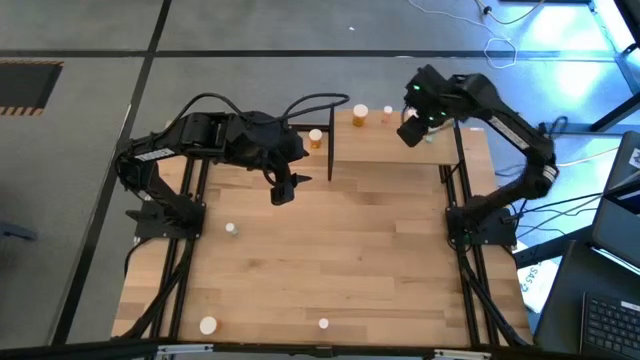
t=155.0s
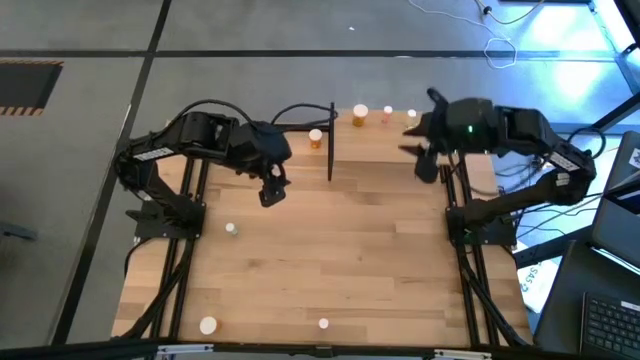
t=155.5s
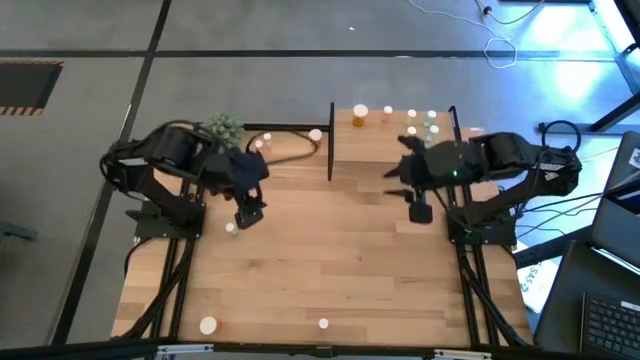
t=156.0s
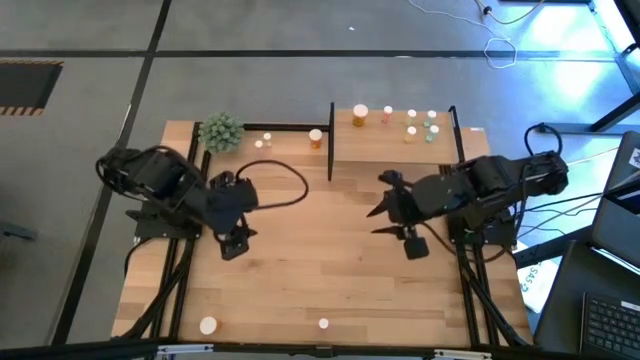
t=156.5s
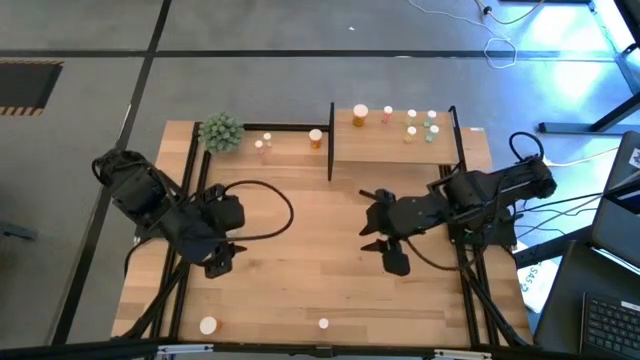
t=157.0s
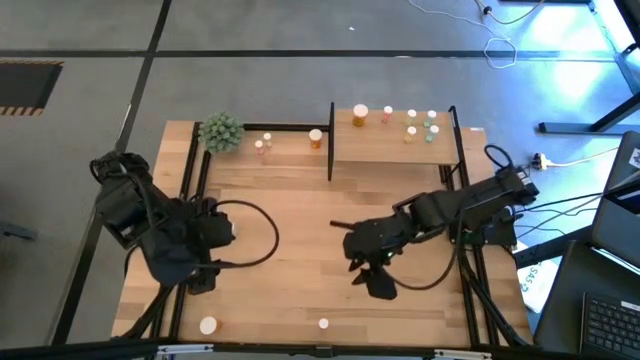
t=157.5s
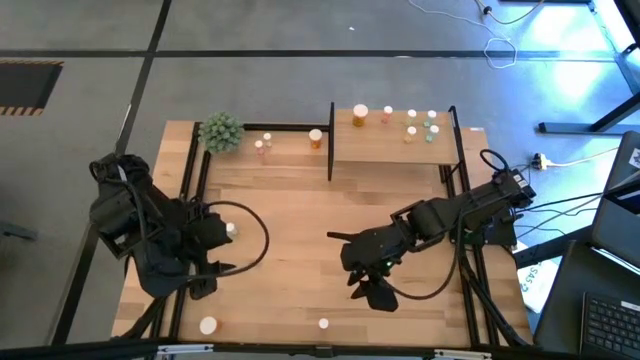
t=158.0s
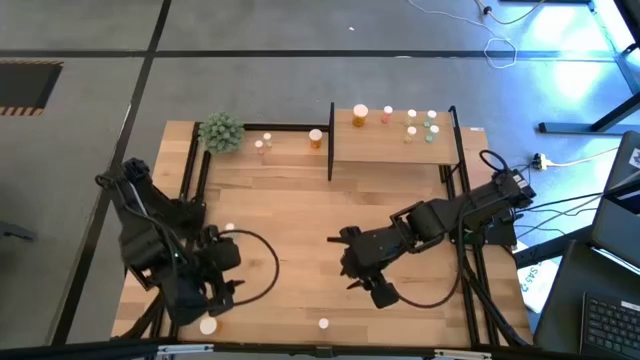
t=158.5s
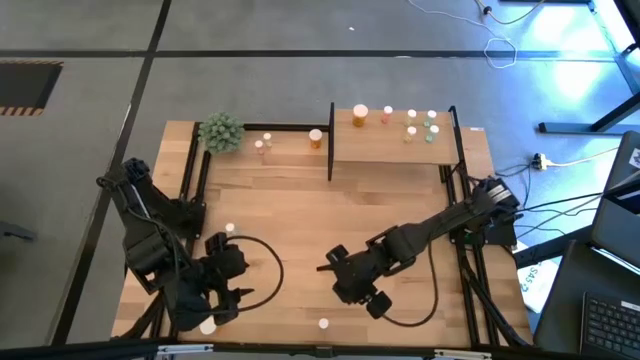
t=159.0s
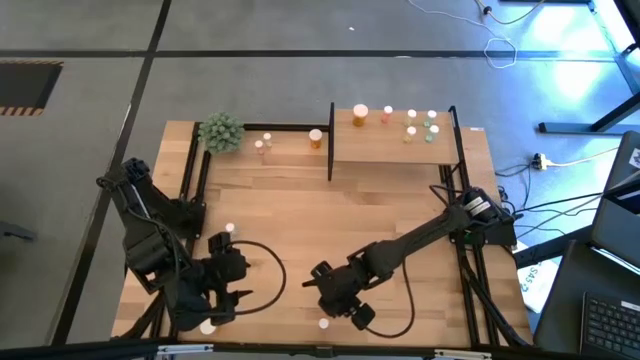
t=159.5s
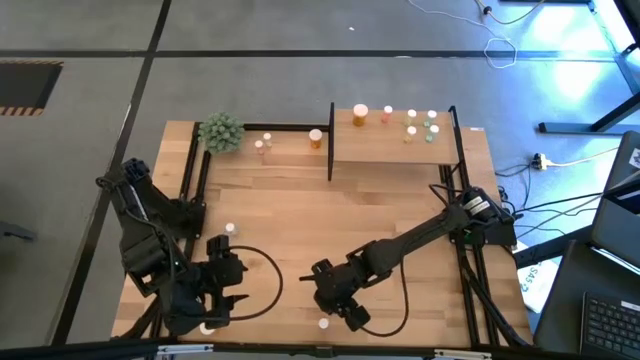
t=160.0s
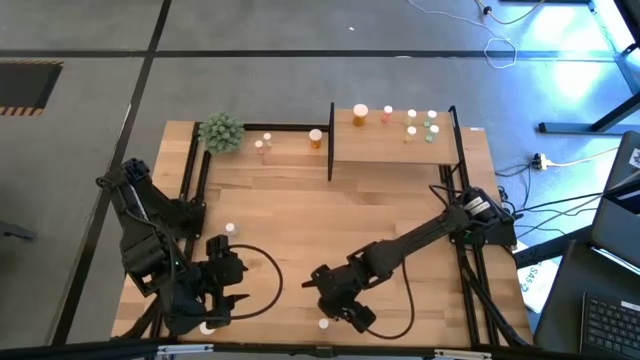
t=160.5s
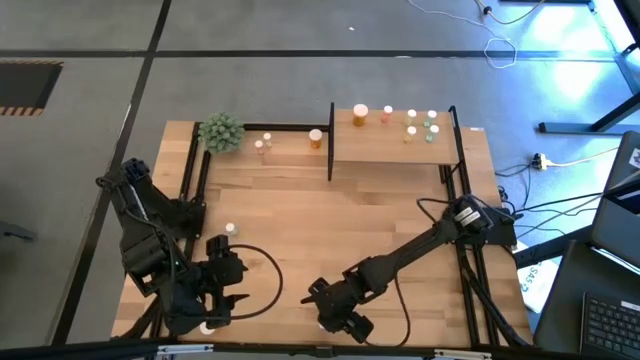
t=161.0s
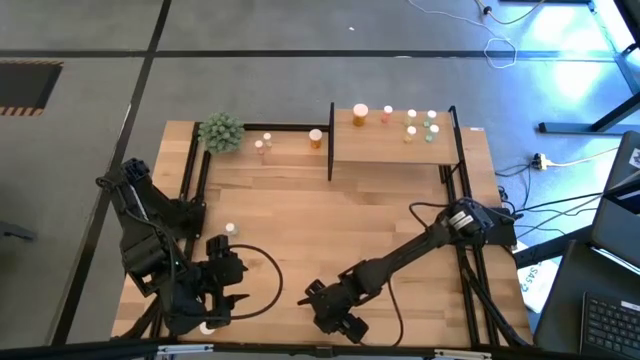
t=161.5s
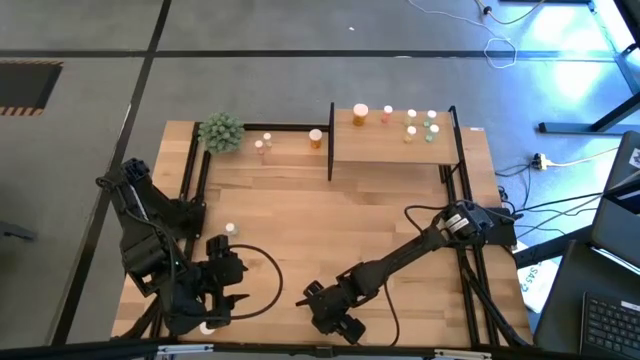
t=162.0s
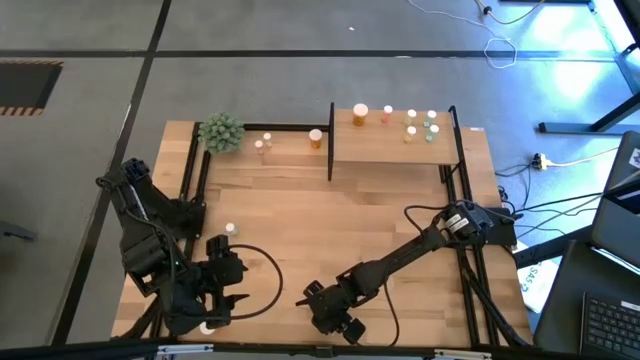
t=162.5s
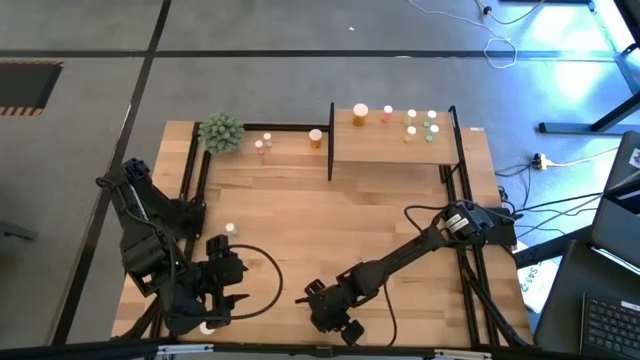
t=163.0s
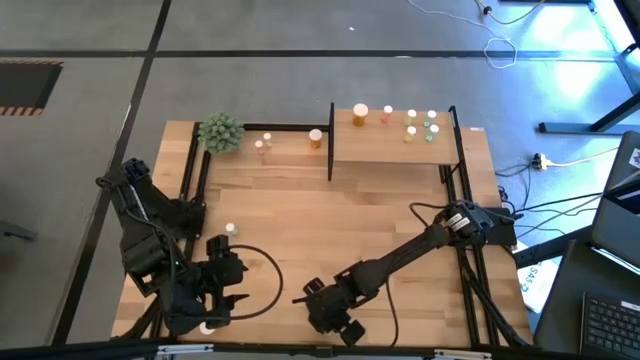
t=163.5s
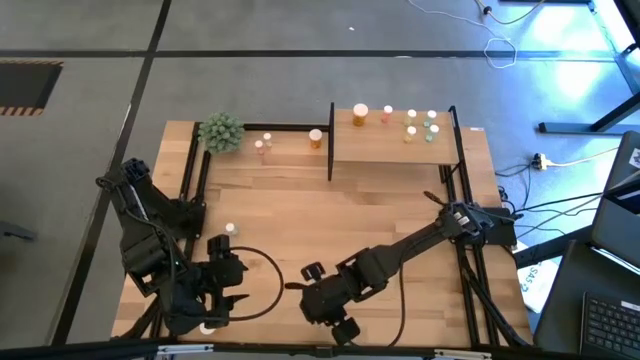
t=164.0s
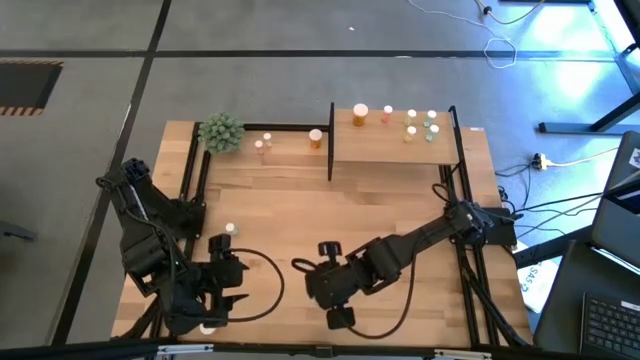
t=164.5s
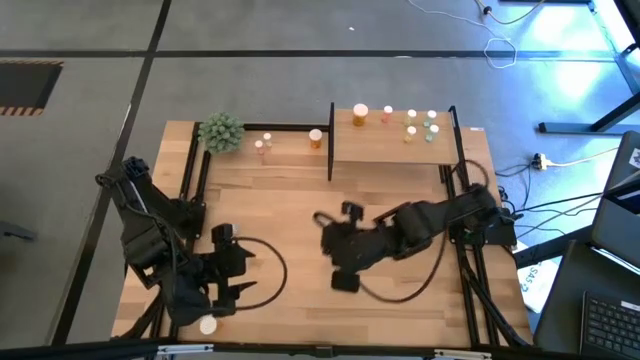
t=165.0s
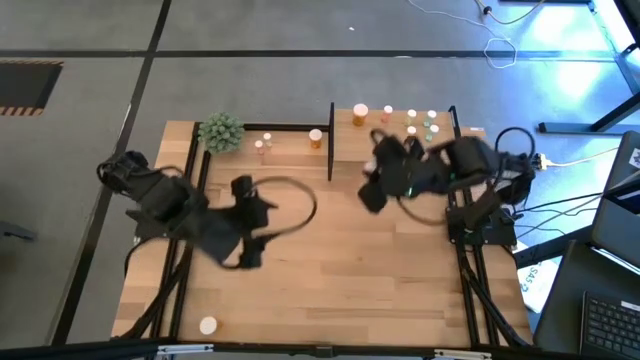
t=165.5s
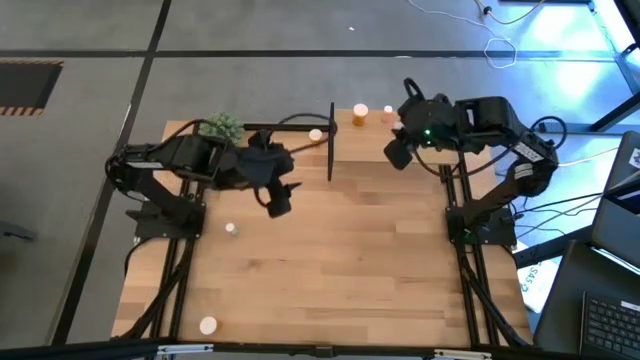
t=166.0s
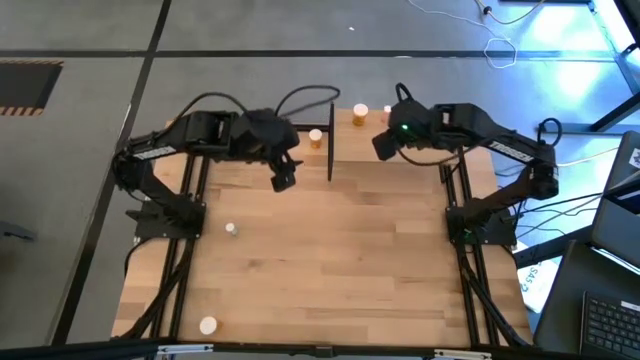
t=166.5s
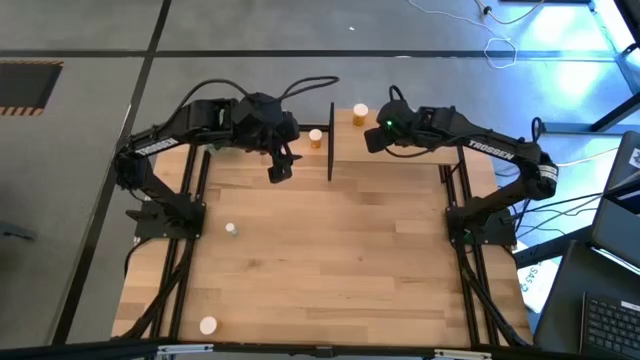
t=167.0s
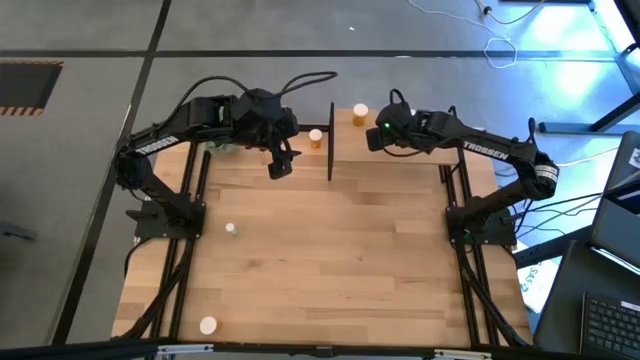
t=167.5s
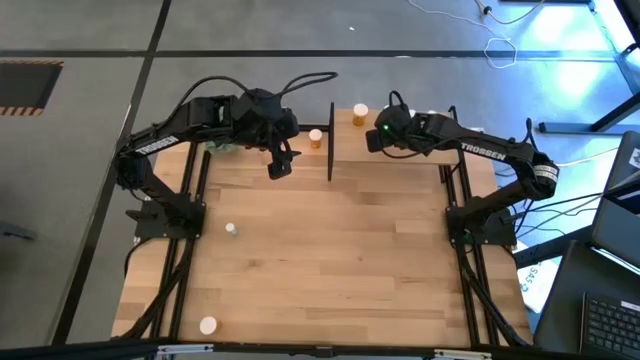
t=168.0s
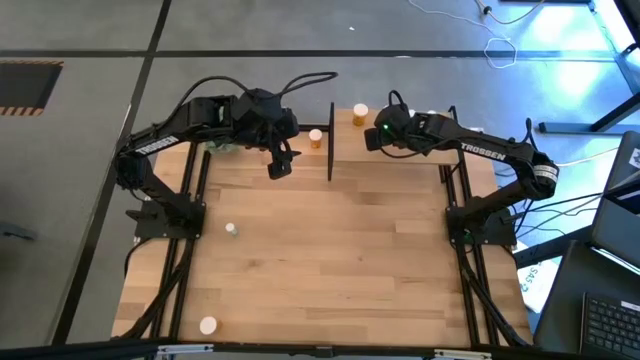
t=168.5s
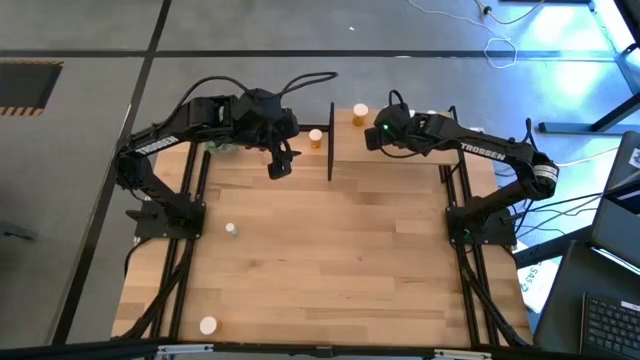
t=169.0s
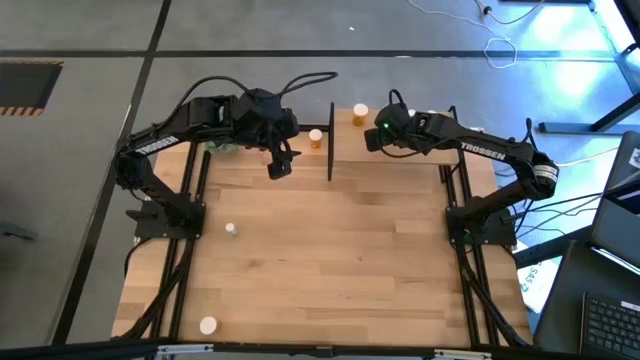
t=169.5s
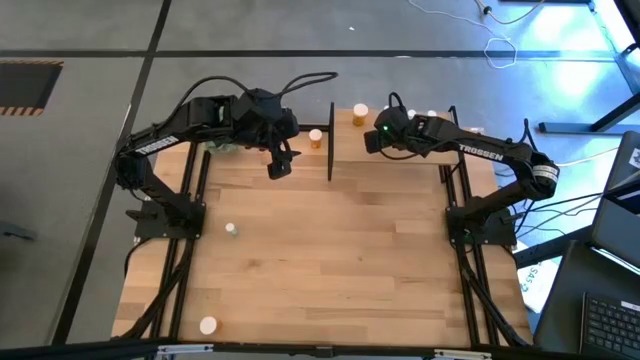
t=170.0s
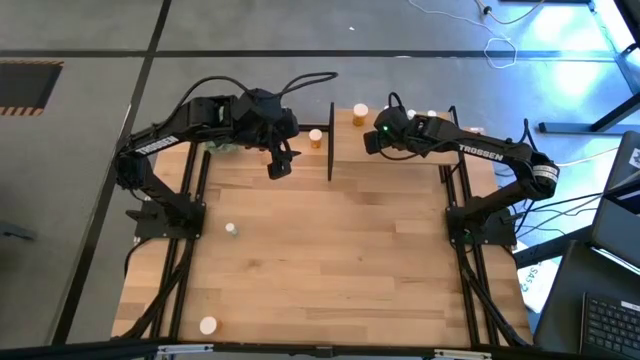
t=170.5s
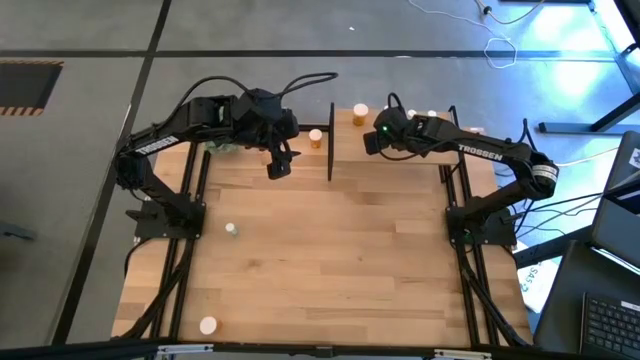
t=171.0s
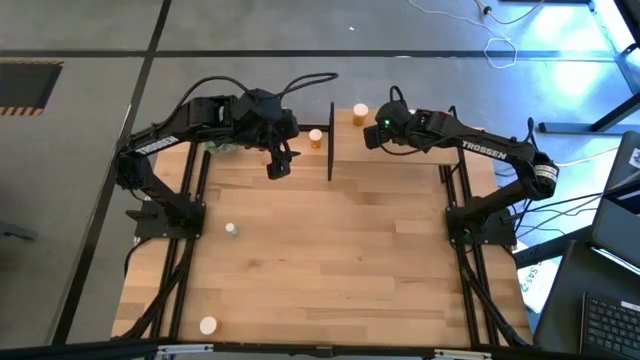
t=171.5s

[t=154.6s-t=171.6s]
Task: Pick and place medicine bottles onto shelf by color
Put the bottom pink pill bottle on the shelf aligned with the other pink pill bottle

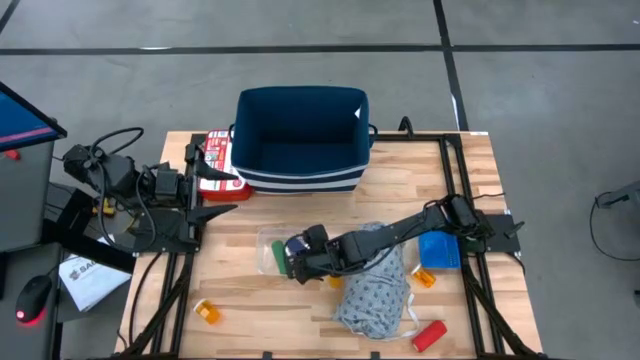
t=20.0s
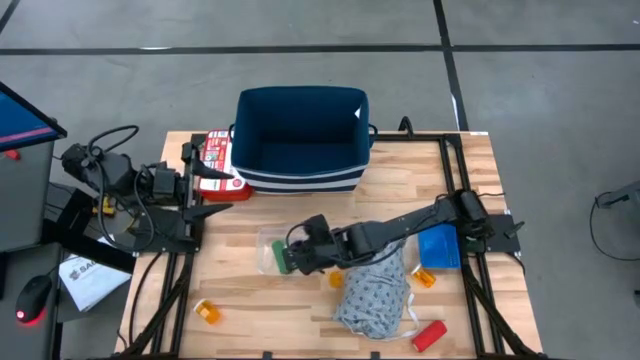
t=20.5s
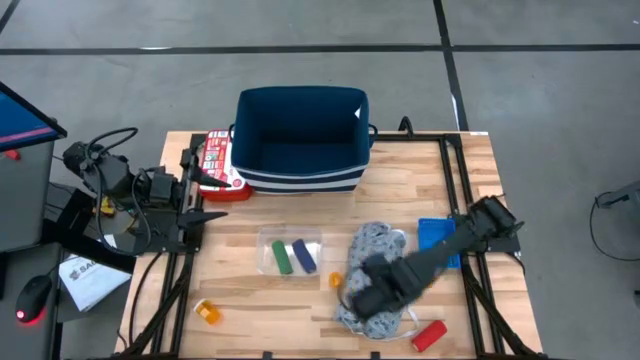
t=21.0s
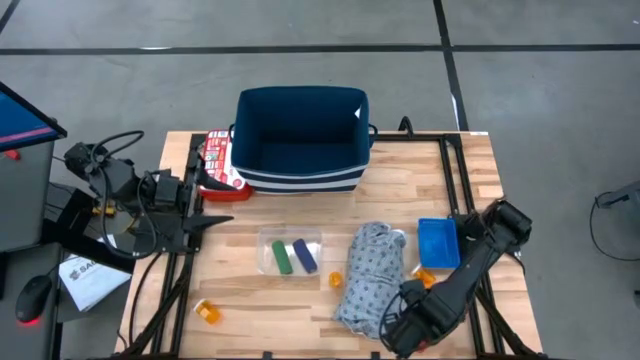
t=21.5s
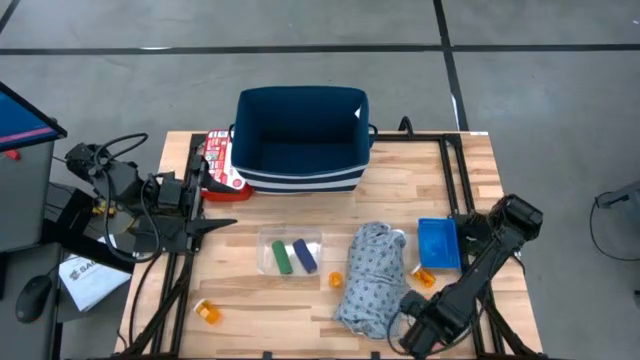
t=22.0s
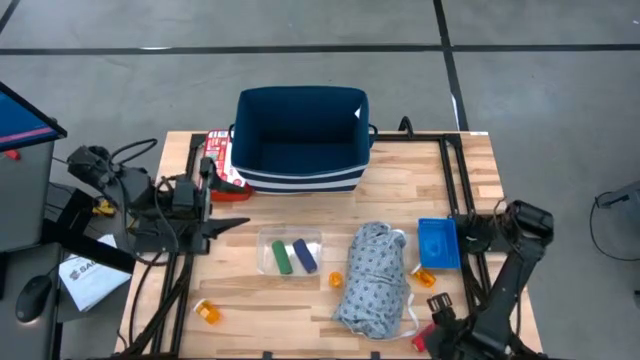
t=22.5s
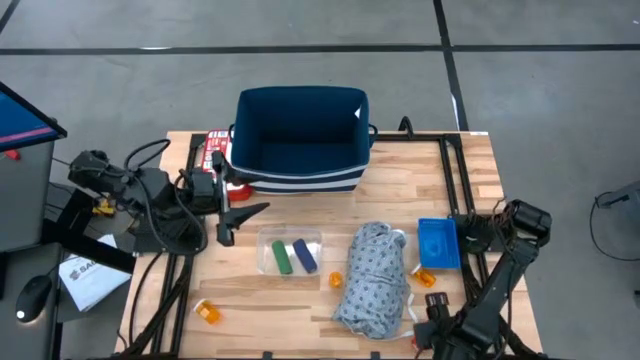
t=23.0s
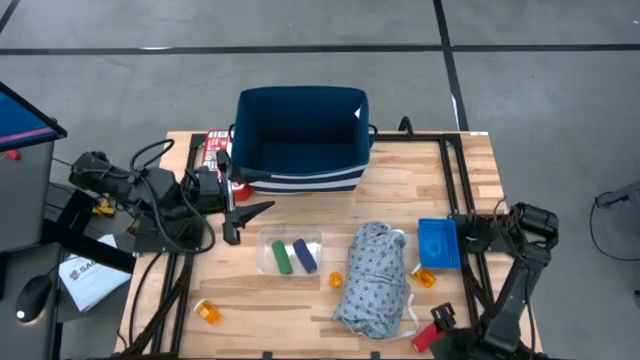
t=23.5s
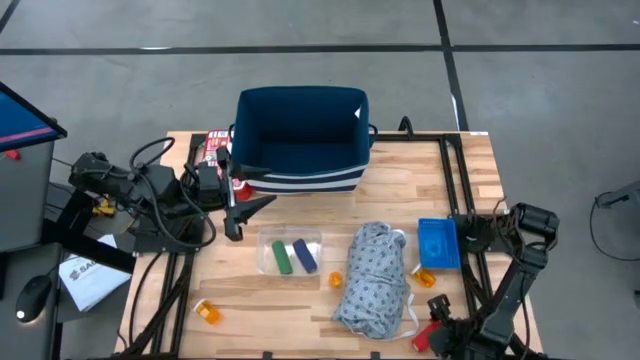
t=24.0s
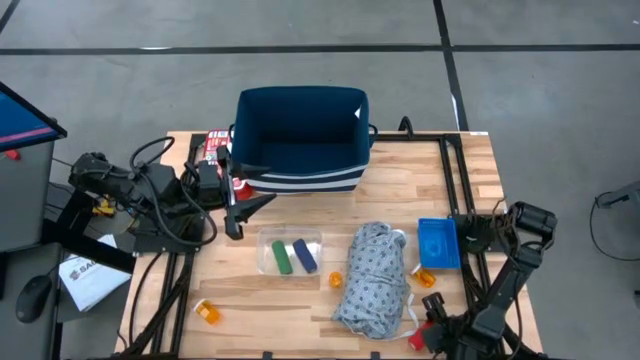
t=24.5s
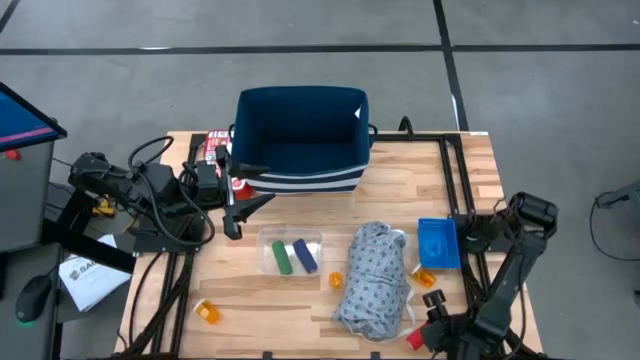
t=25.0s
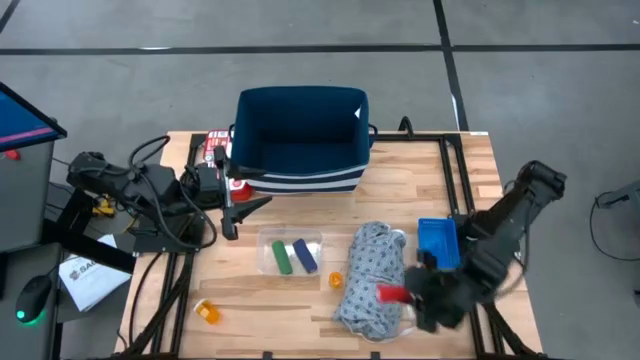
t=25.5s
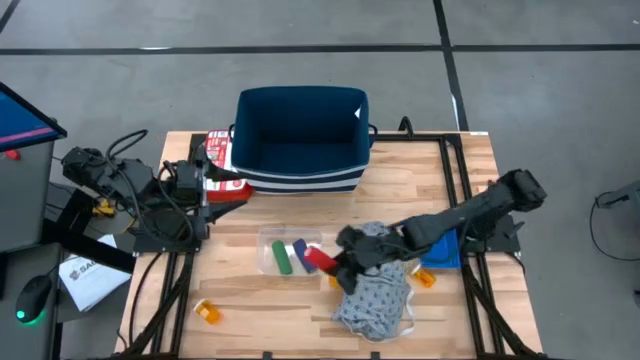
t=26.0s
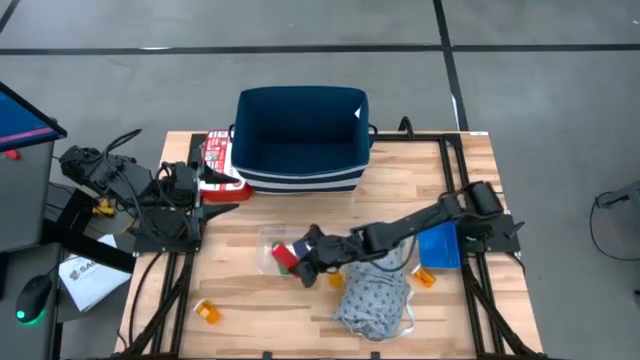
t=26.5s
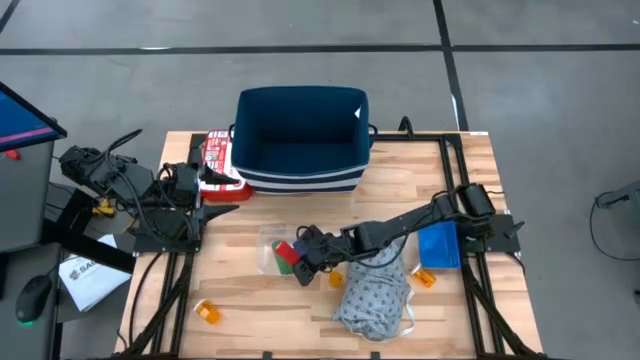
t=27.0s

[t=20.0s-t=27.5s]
Task: Pick & place medical supplies in basket/bin
Put the red bandage into the transparent bin
